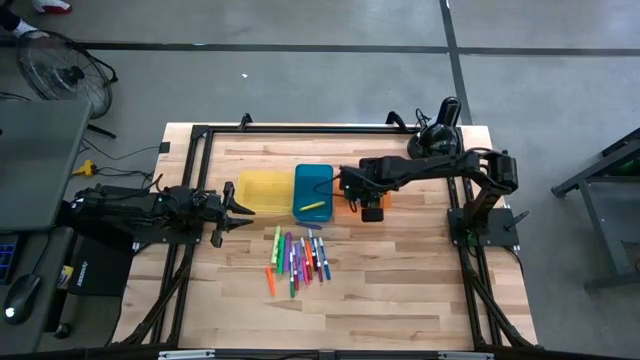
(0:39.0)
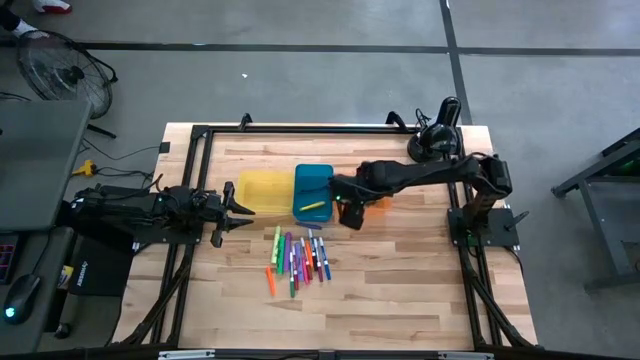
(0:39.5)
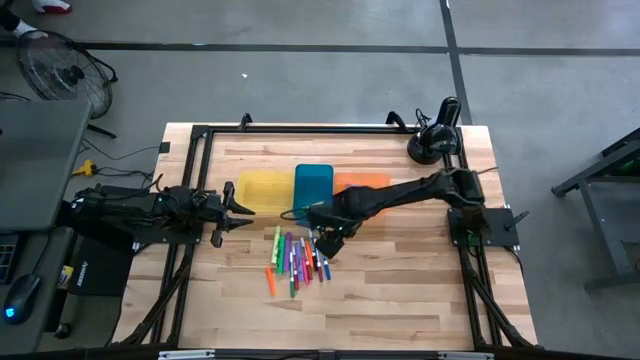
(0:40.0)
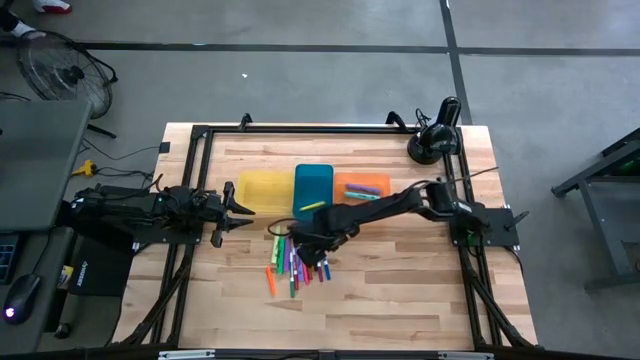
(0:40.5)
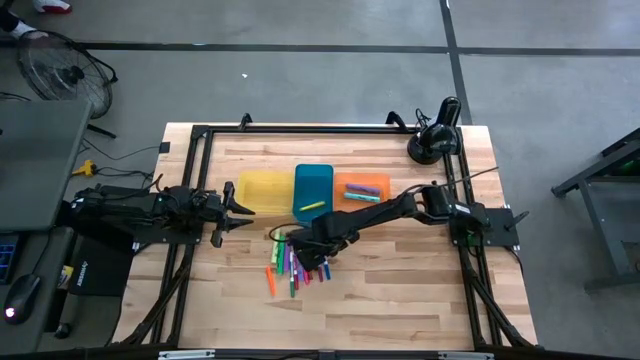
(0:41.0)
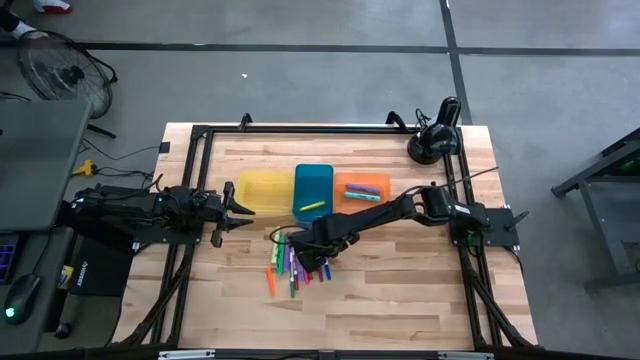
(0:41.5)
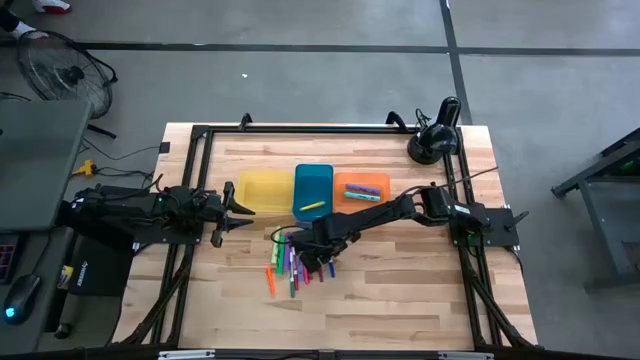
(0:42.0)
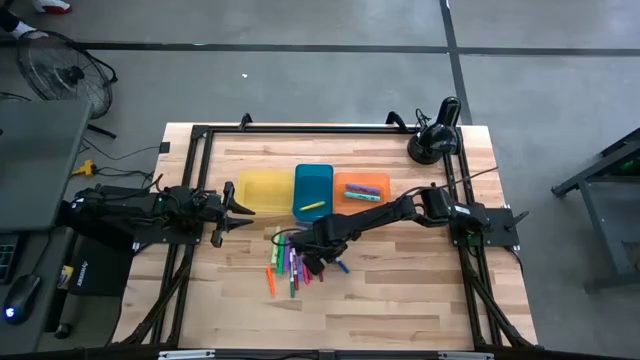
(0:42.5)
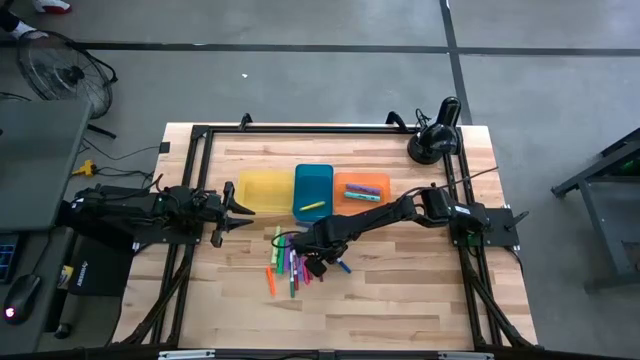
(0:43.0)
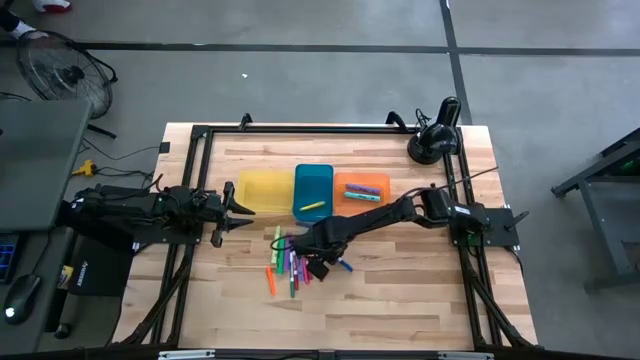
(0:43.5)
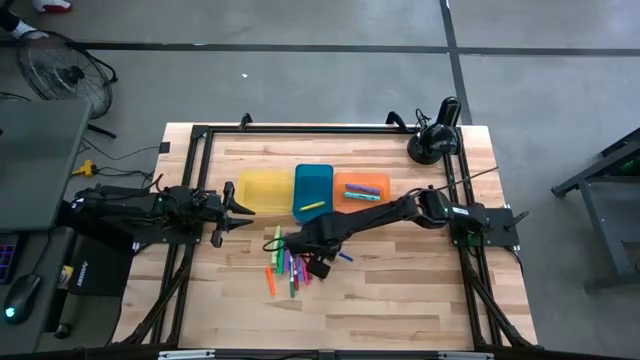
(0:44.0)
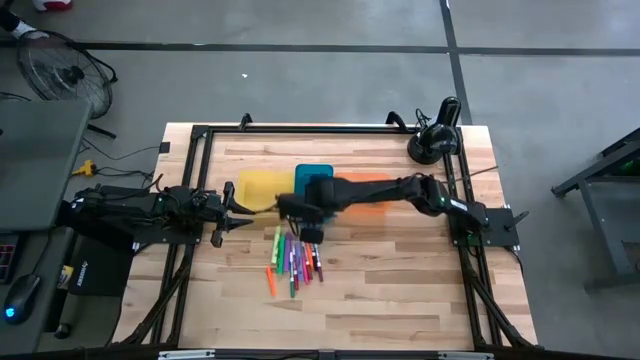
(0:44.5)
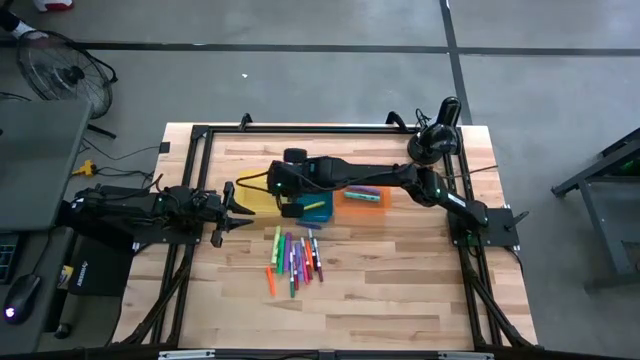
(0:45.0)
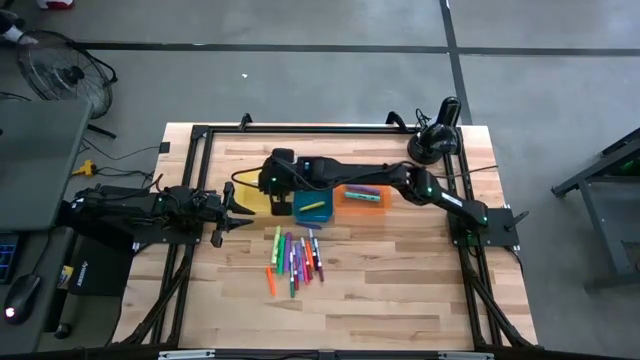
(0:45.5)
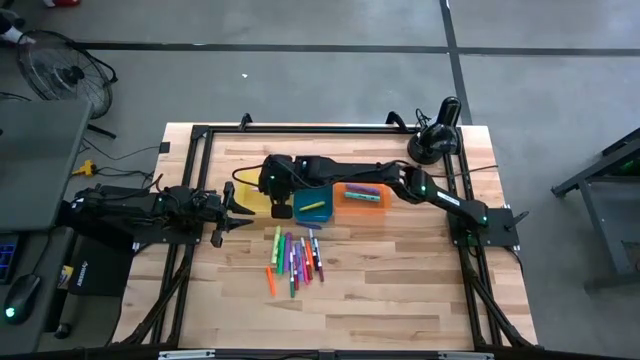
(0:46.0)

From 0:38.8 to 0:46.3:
Task: Pick & Place Markers
Put the blue dry erase marker into the yellow bin

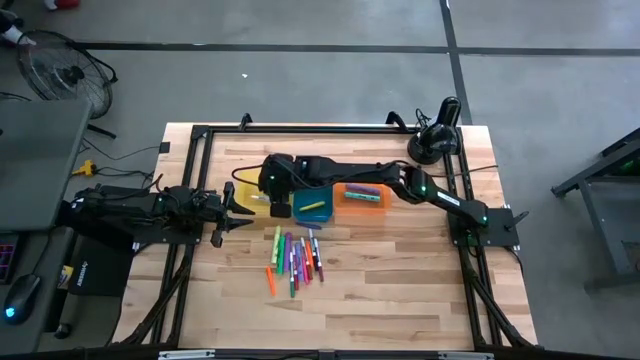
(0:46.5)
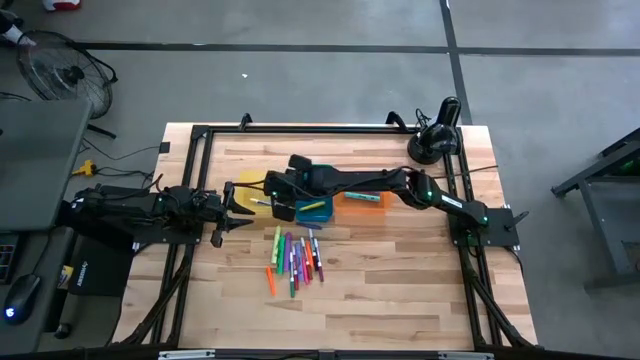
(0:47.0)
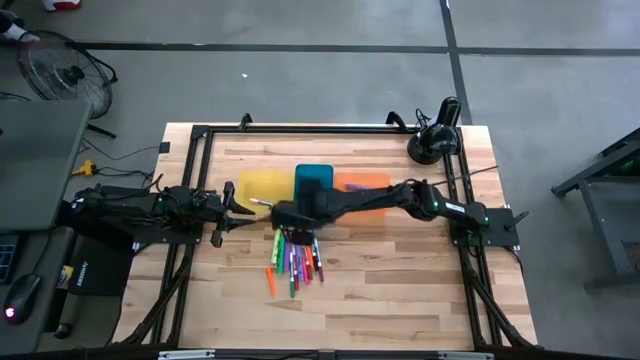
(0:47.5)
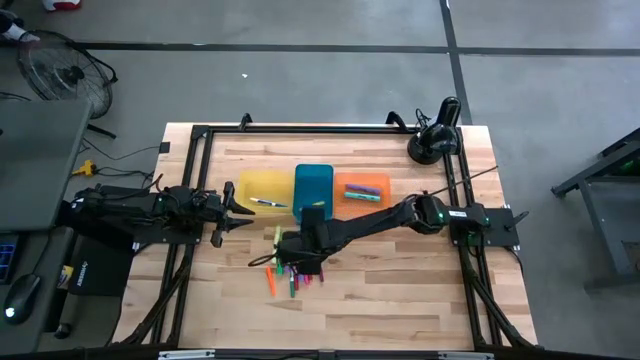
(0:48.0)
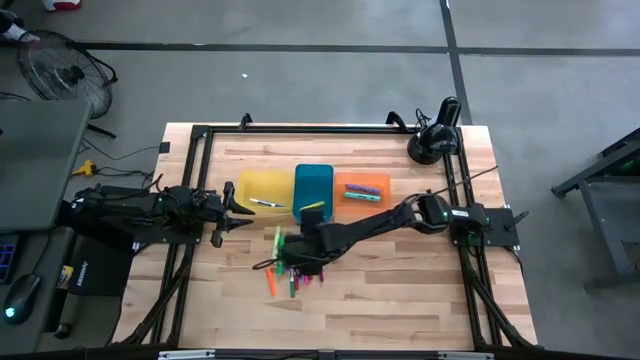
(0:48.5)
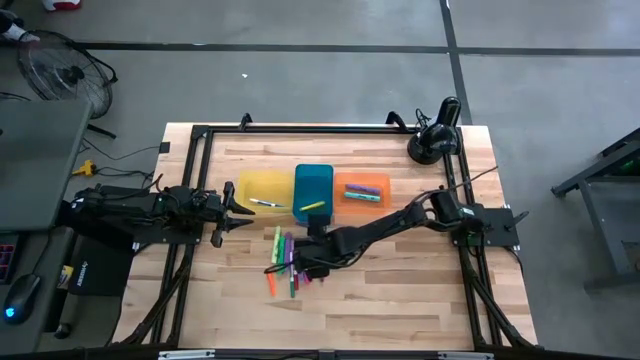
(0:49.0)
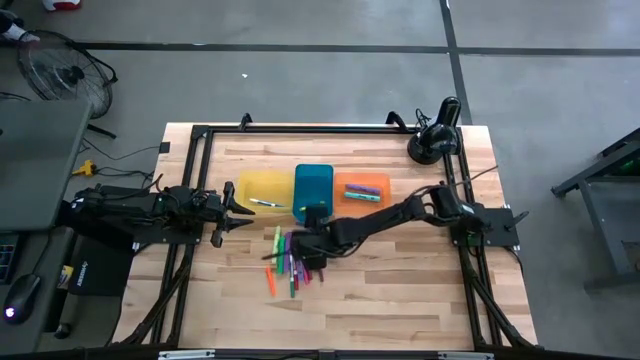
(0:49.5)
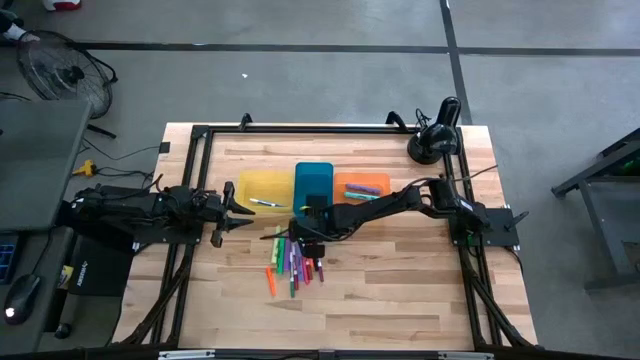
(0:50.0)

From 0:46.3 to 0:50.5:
Adjust the blue bin

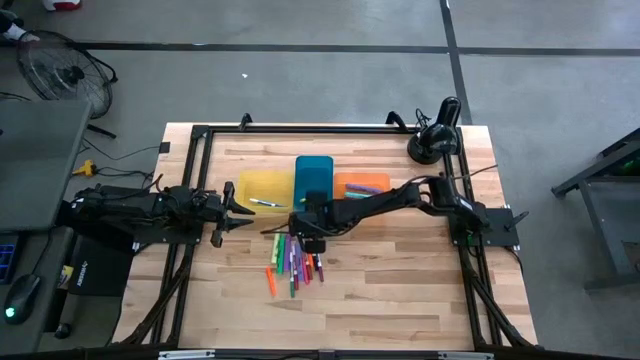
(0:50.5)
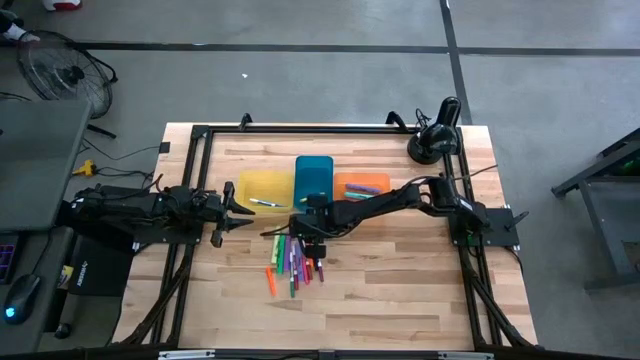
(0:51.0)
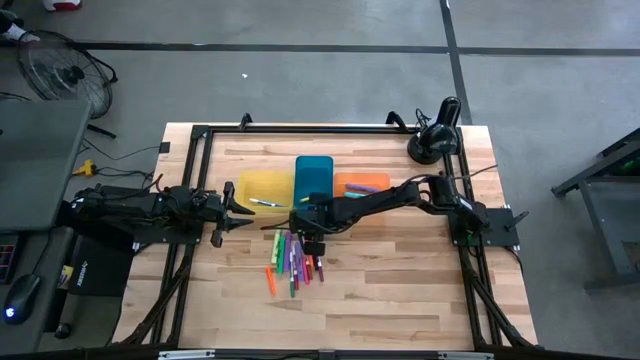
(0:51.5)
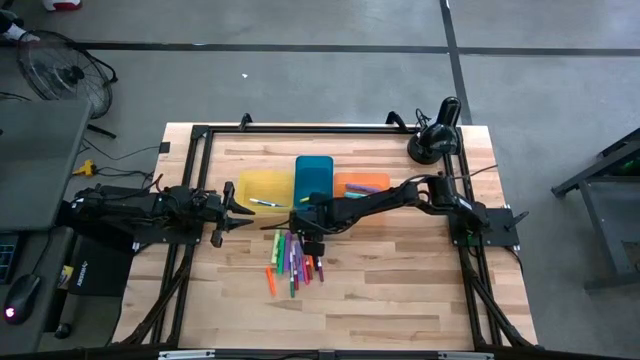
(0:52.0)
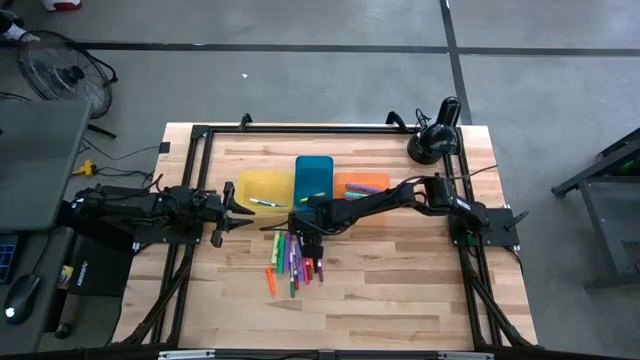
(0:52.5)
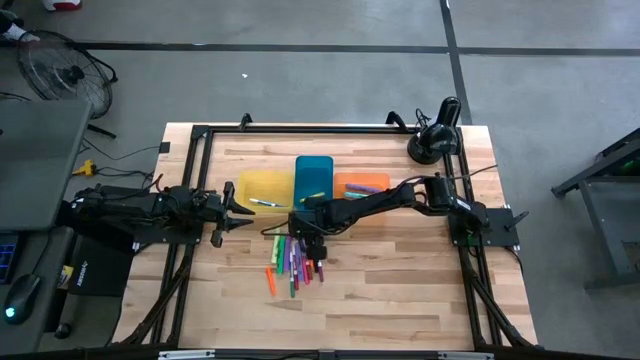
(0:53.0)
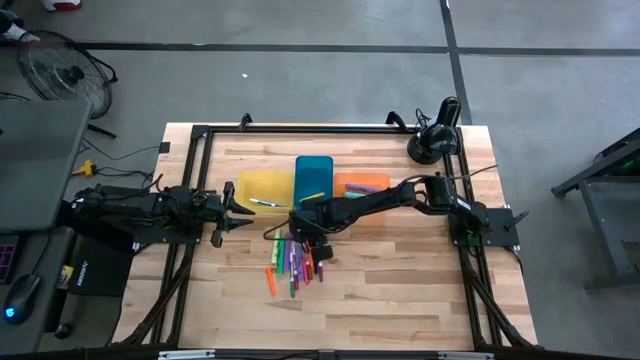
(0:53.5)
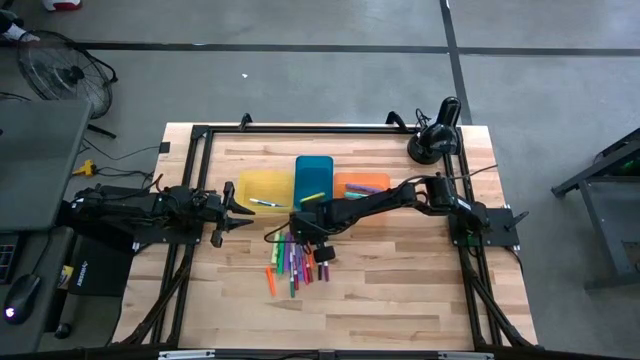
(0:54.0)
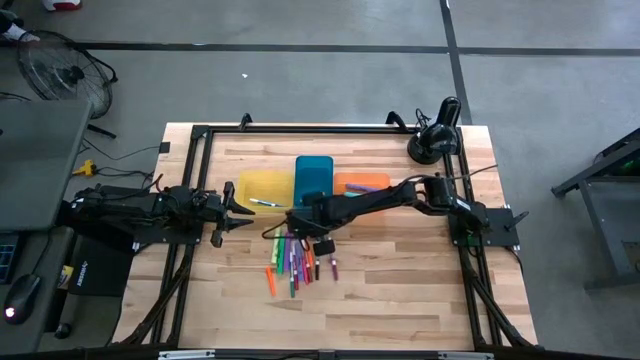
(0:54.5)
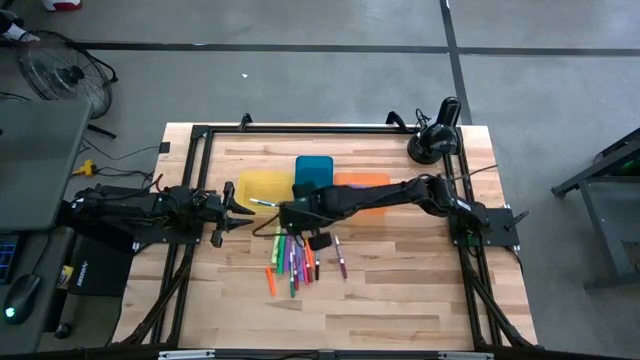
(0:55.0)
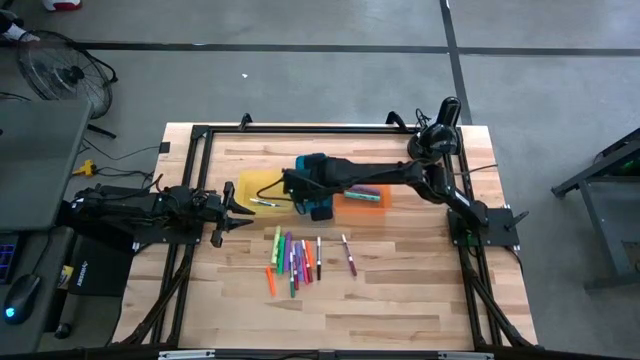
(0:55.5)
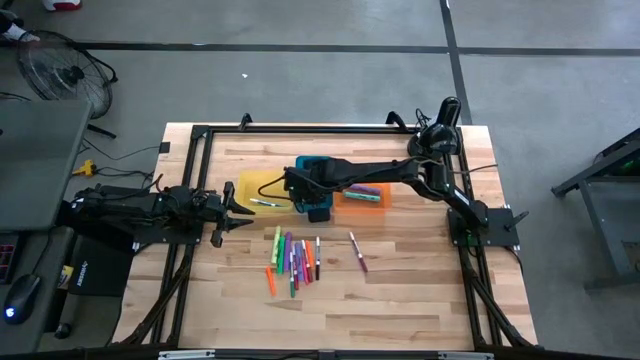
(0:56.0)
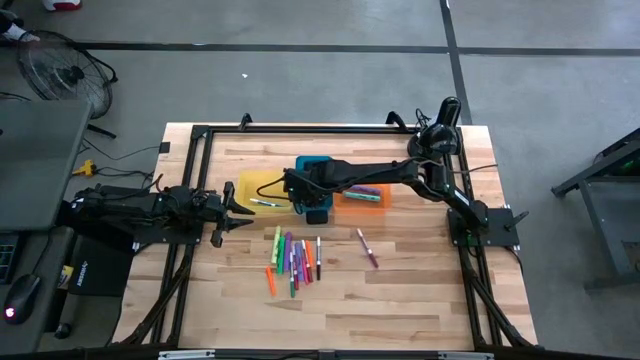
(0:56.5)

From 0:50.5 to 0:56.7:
Put the dark blue pen into the blue bin

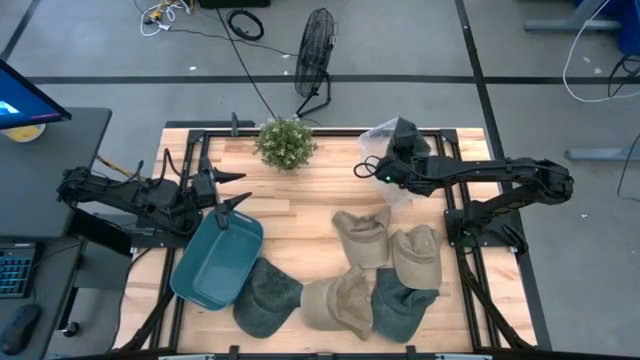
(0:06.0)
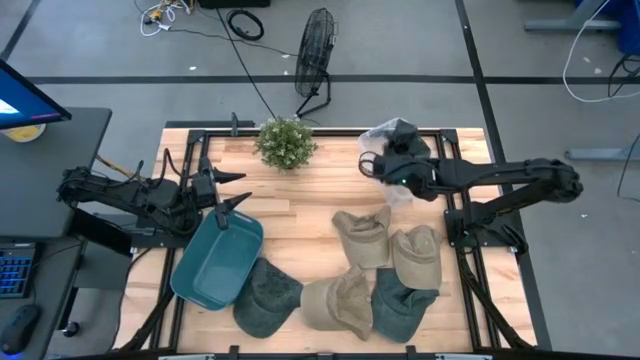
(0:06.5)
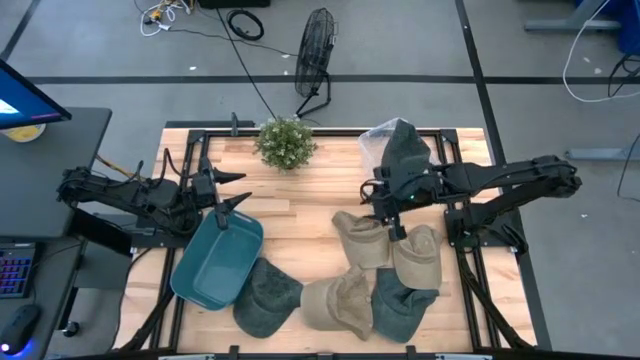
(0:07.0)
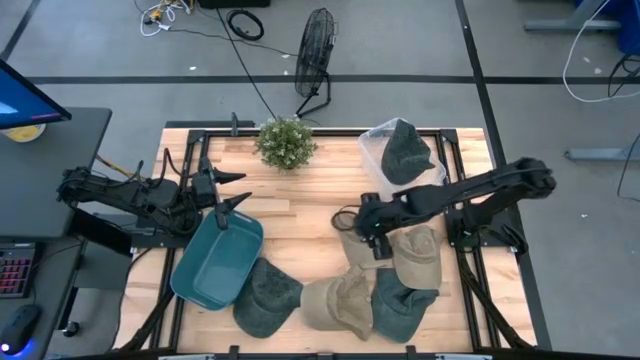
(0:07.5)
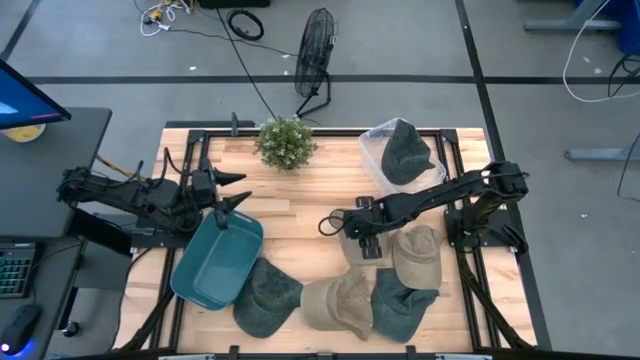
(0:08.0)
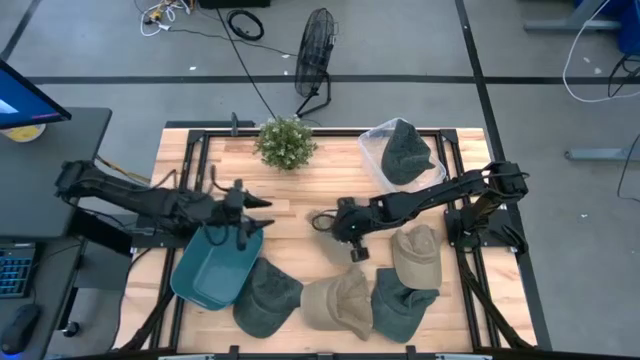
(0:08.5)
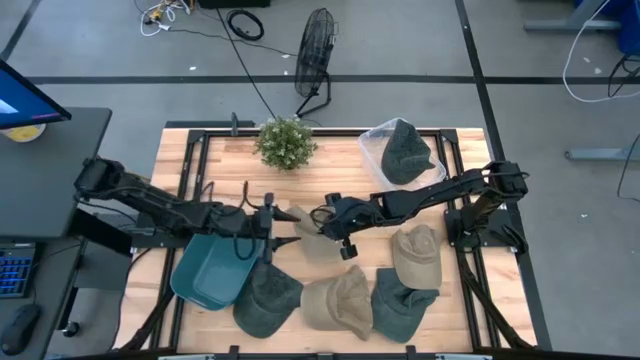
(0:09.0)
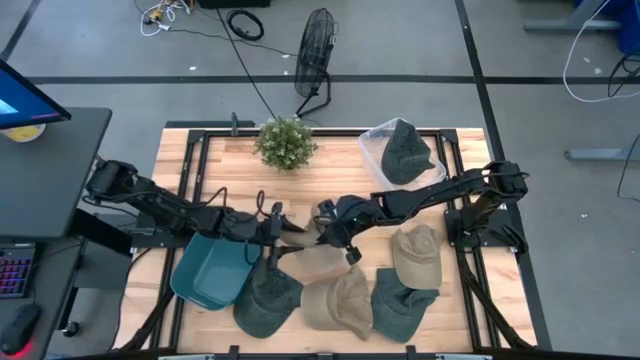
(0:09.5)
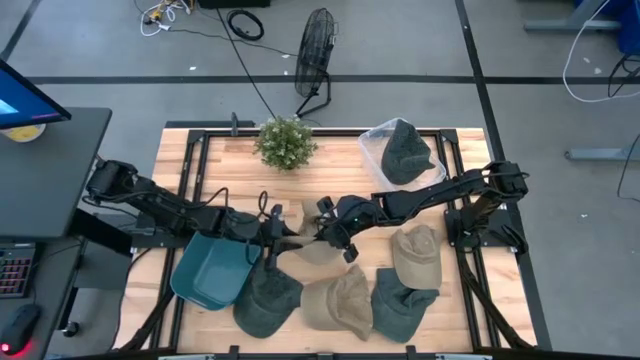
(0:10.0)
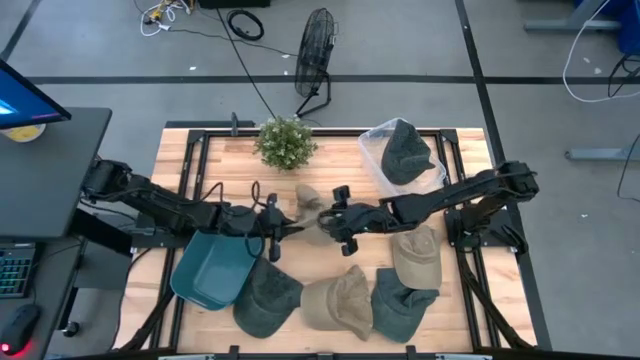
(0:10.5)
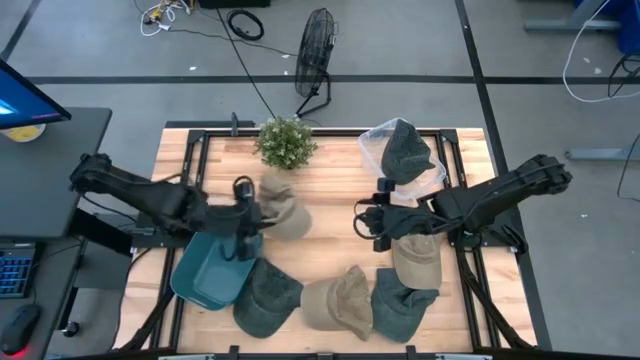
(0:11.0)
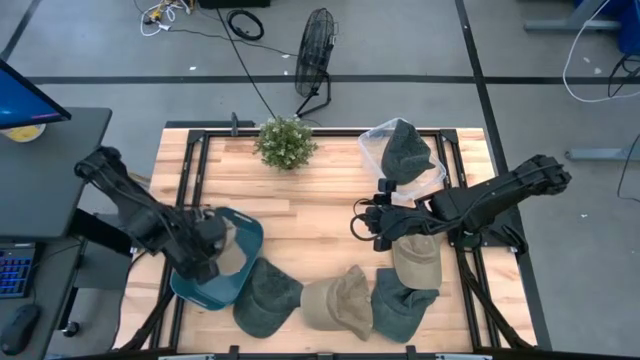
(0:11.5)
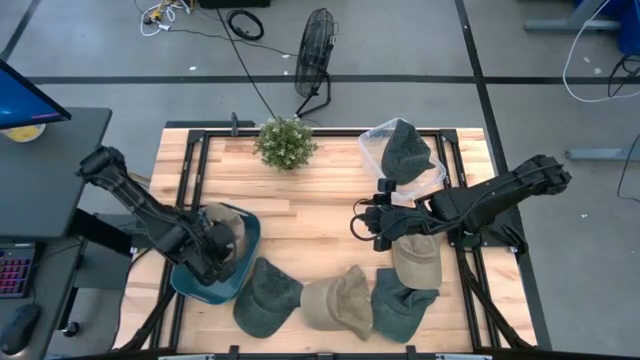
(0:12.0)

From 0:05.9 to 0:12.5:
Task: Pick & Place hat
Put the top left brown cap into the blue bin
